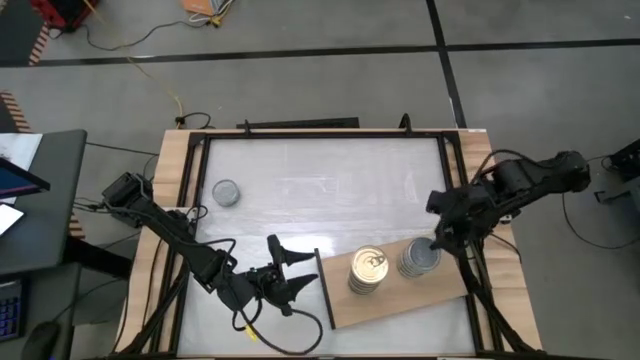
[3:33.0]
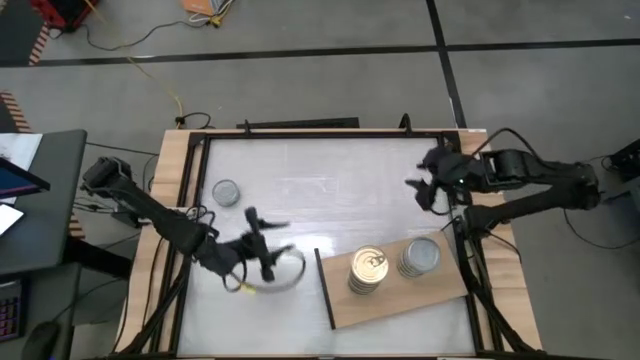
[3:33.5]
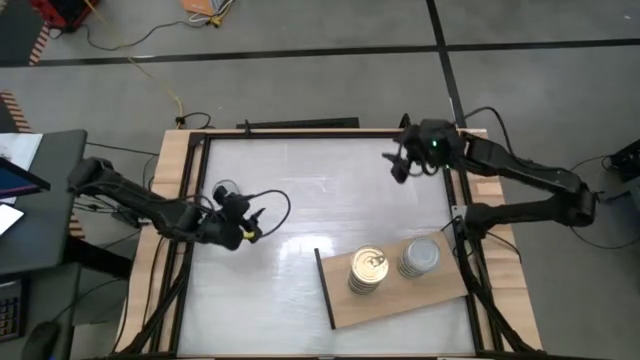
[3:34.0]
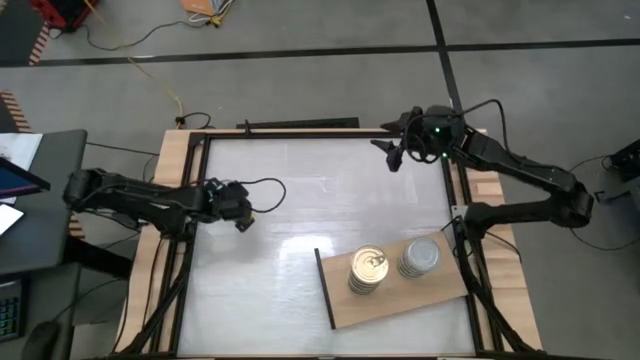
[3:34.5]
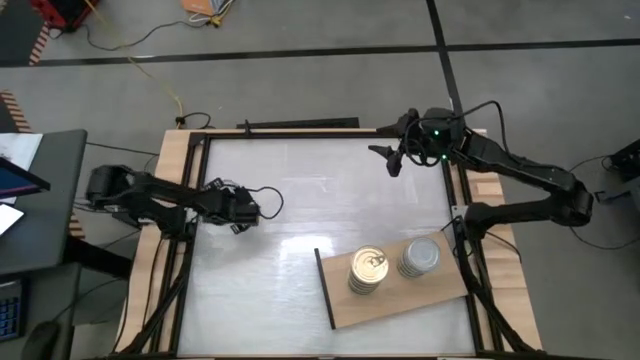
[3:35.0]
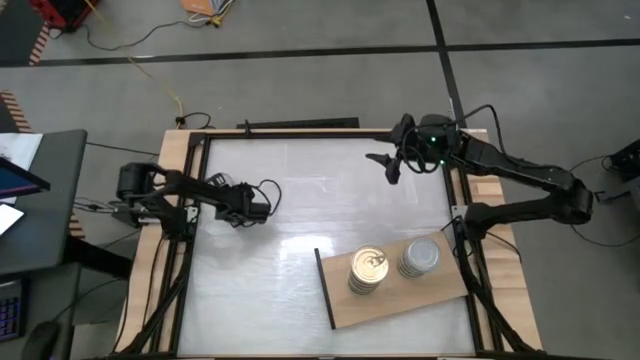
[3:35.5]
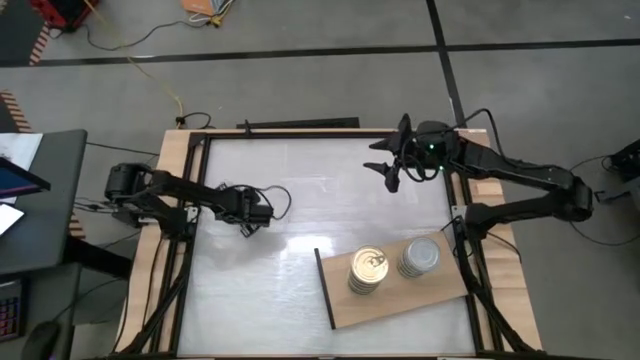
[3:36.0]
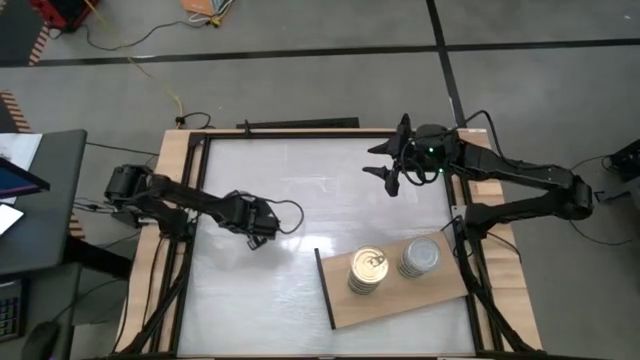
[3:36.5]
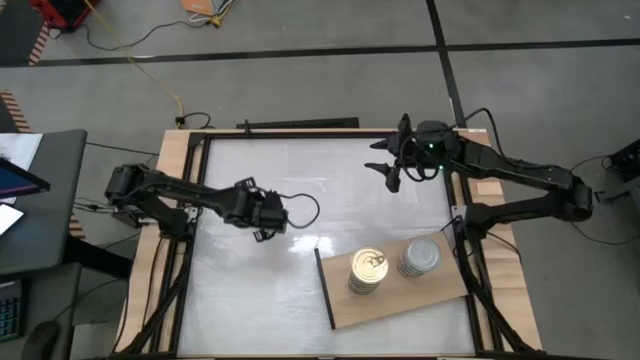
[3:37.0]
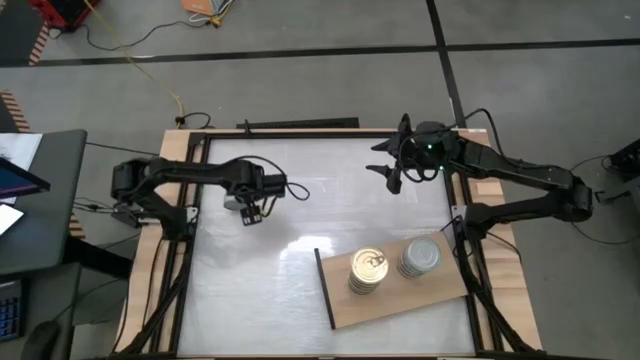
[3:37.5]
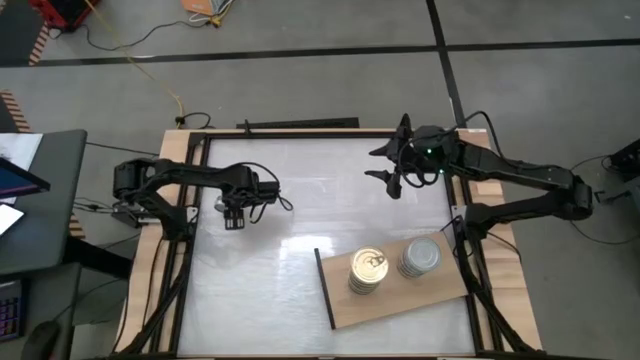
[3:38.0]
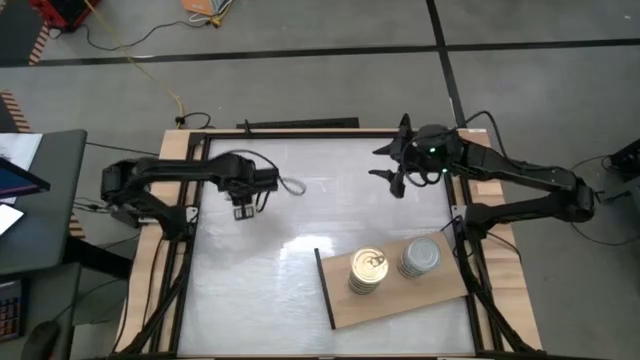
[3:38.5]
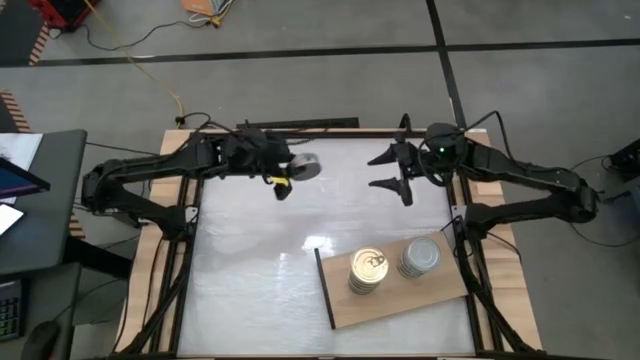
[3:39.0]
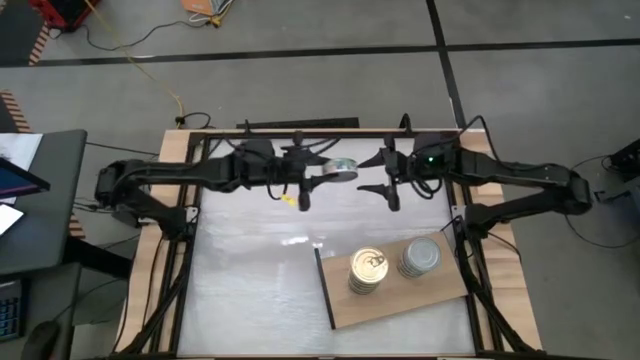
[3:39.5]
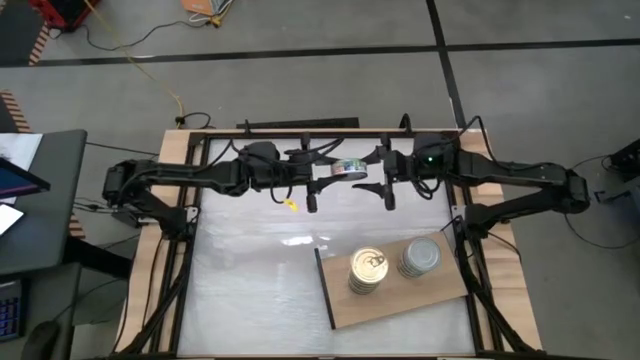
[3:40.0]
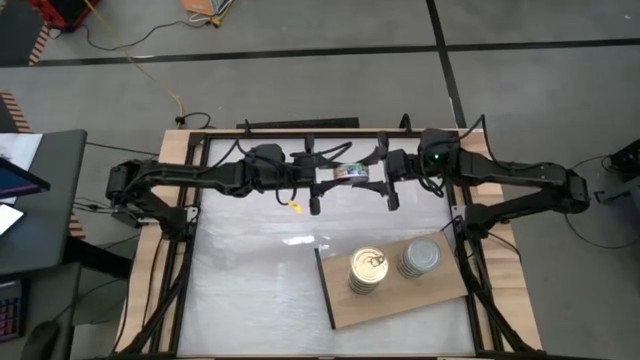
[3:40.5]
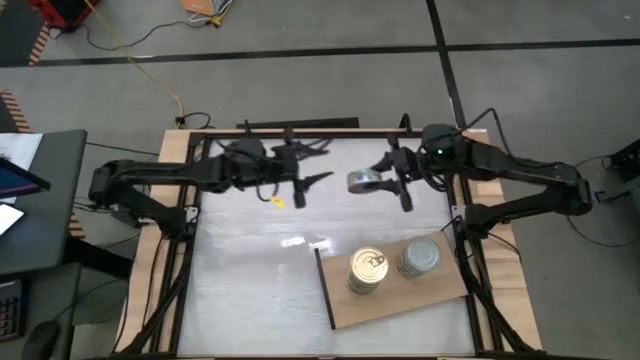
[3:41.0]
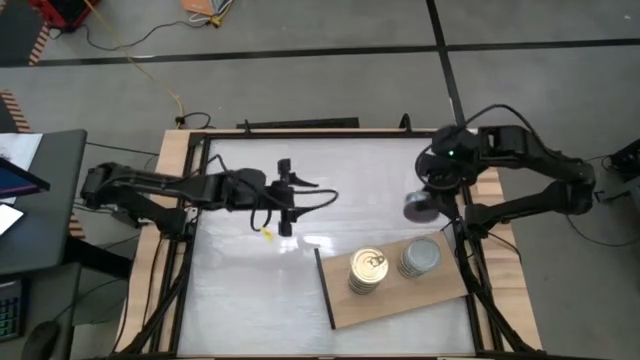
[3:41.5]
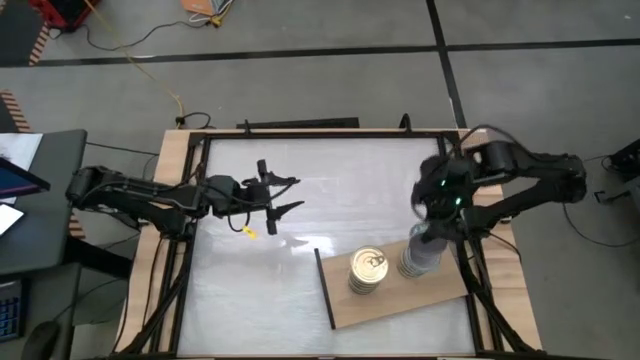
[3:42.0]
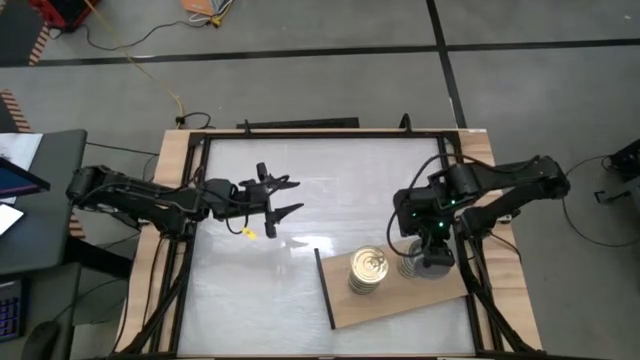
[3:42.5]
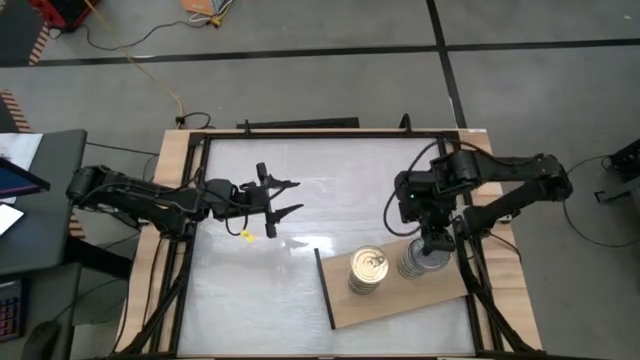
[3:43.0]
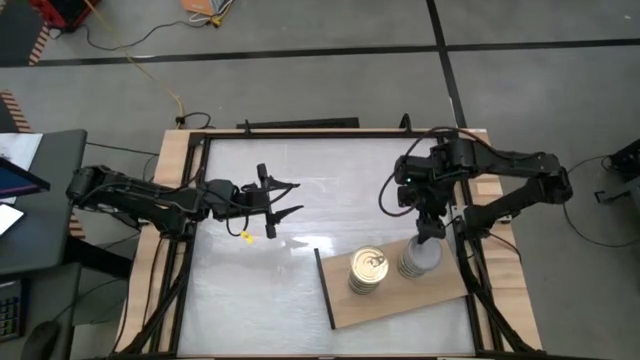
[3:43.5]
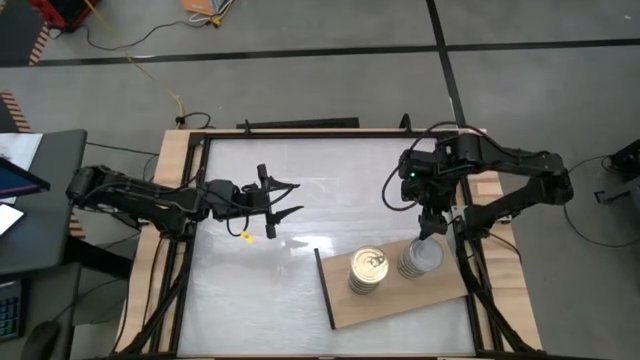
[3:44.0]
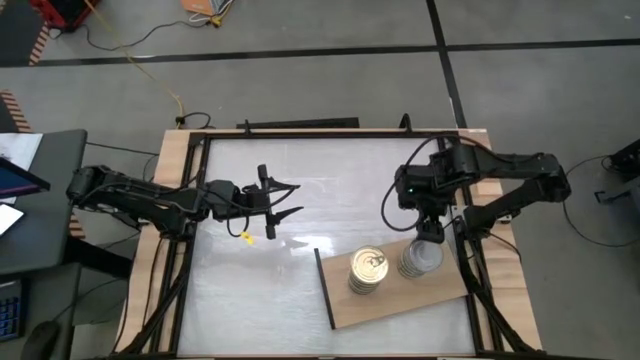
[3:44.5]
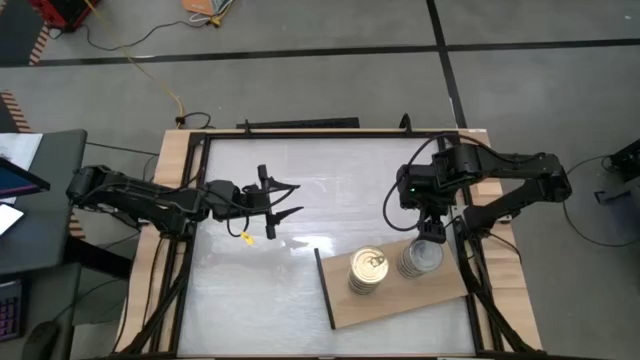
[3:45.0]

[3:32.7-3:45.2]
Task: Stack canned seafood by type on shelf
Stack the green tuna can on top of the green tuna can on the shelf

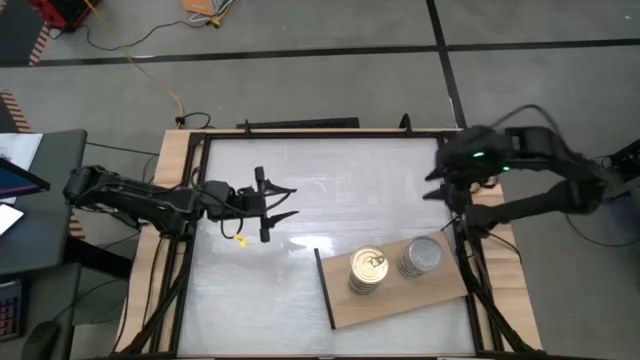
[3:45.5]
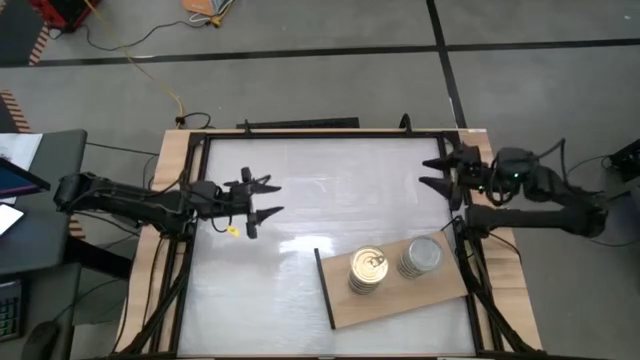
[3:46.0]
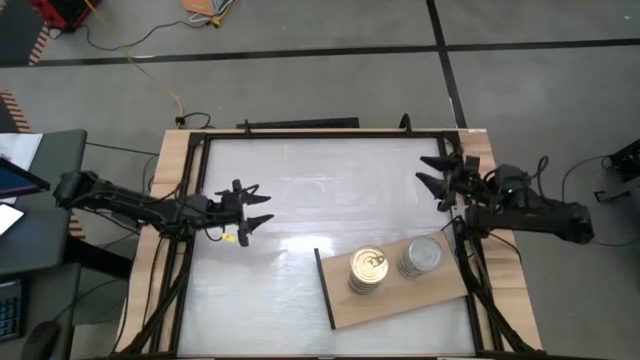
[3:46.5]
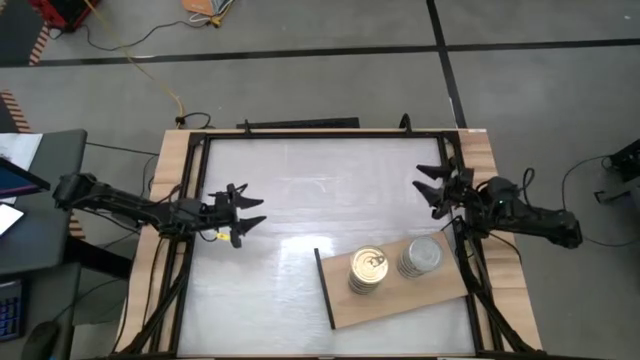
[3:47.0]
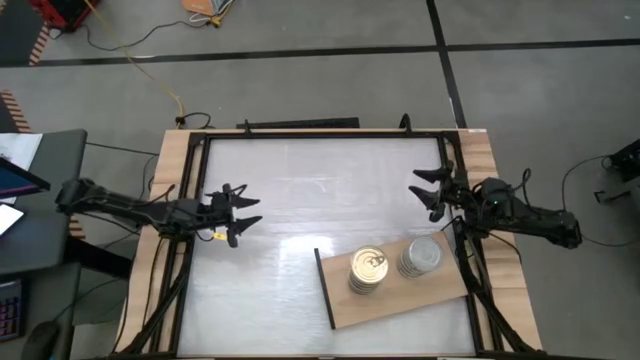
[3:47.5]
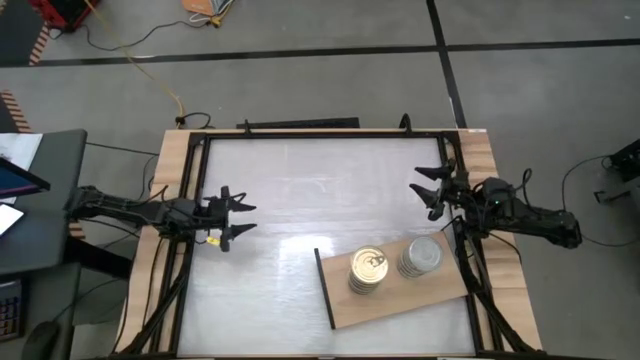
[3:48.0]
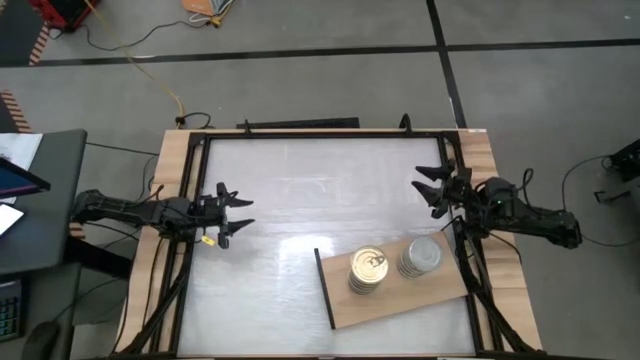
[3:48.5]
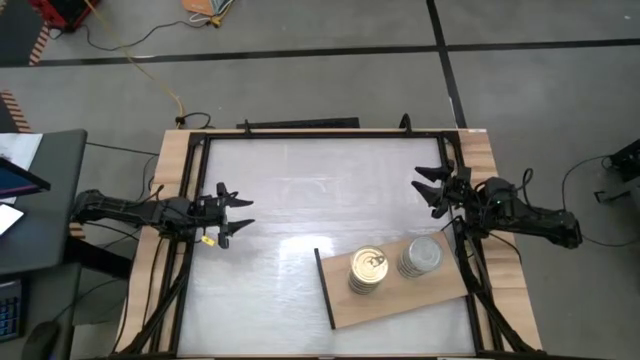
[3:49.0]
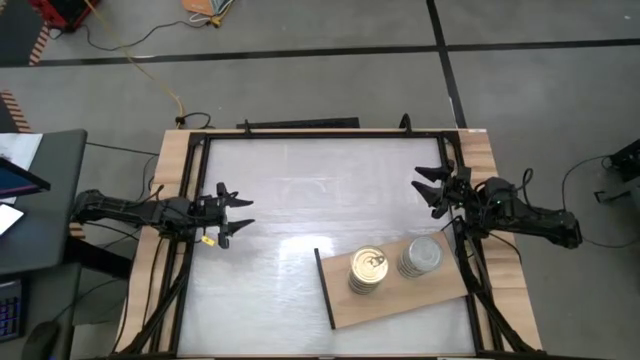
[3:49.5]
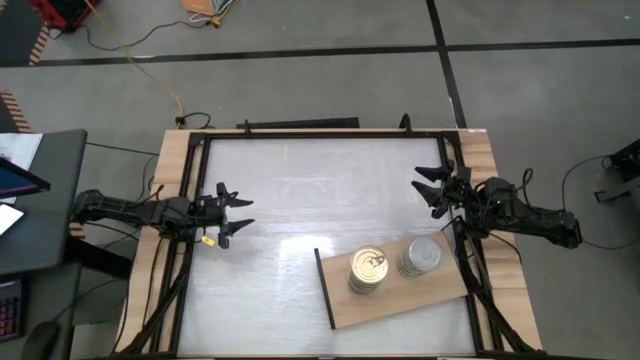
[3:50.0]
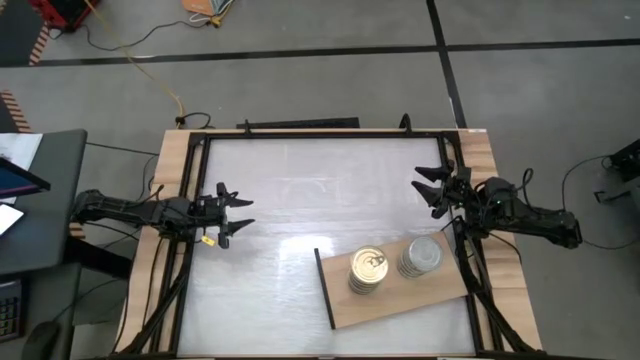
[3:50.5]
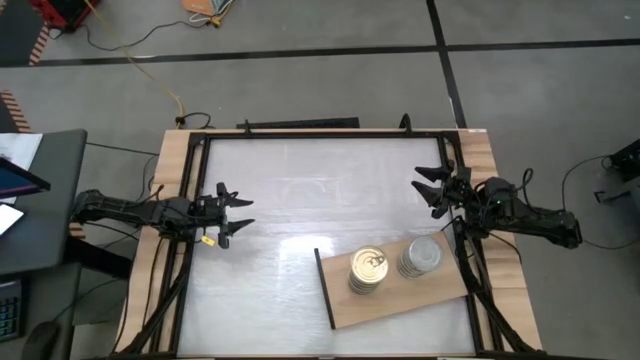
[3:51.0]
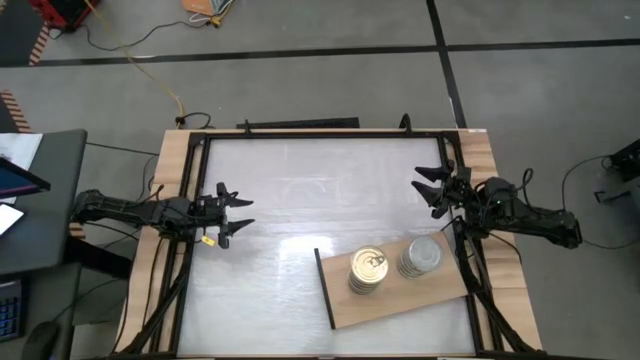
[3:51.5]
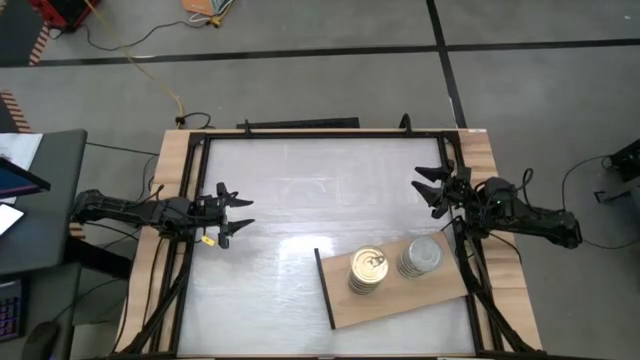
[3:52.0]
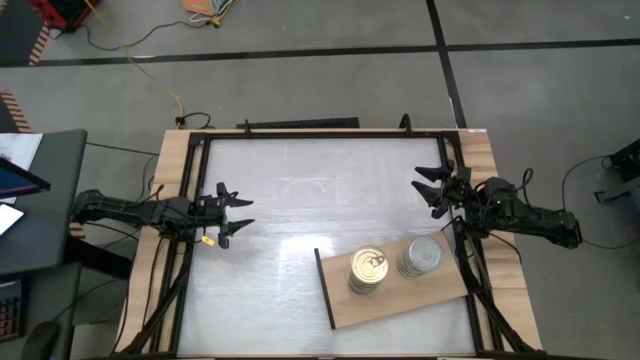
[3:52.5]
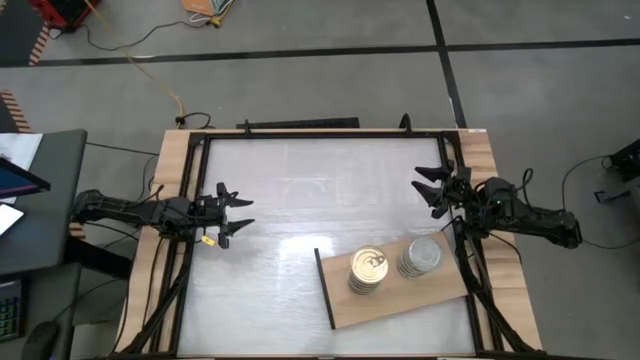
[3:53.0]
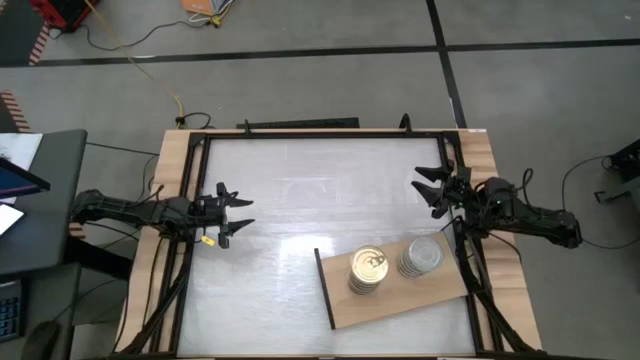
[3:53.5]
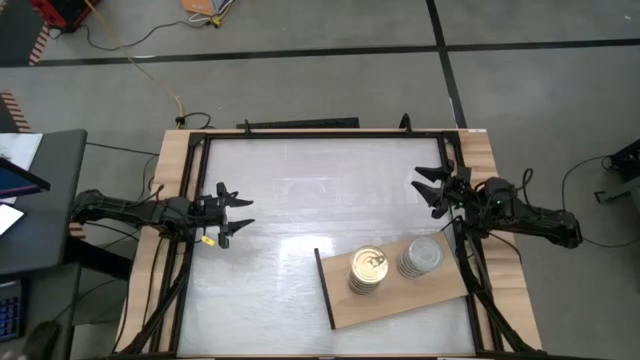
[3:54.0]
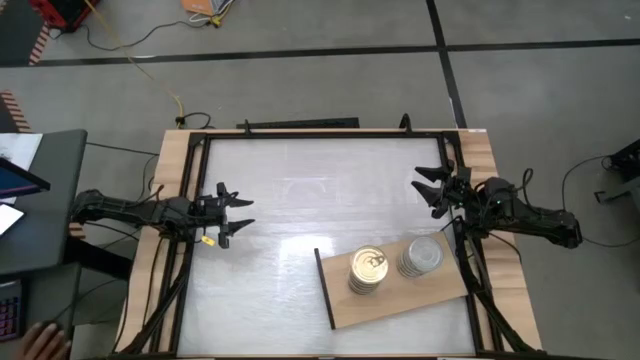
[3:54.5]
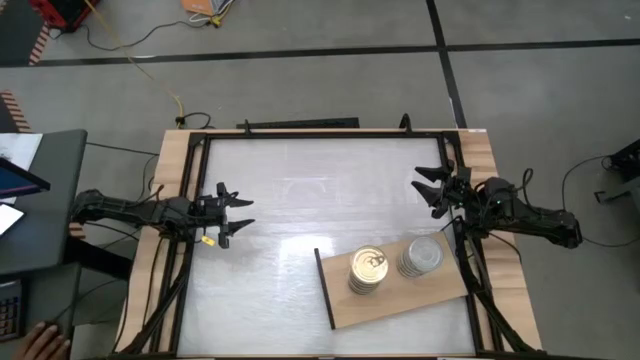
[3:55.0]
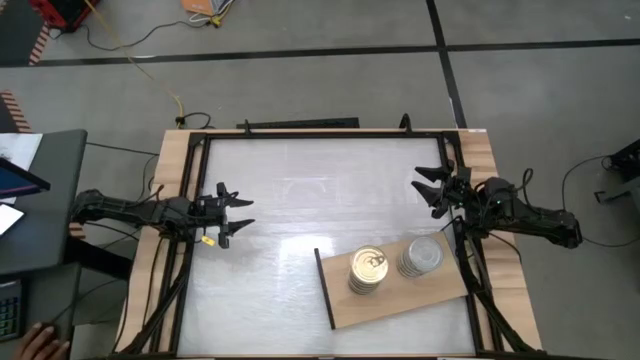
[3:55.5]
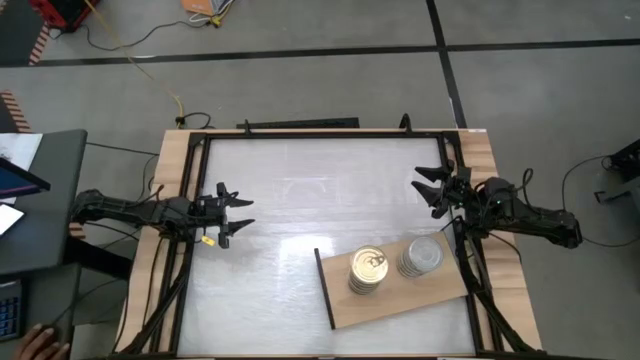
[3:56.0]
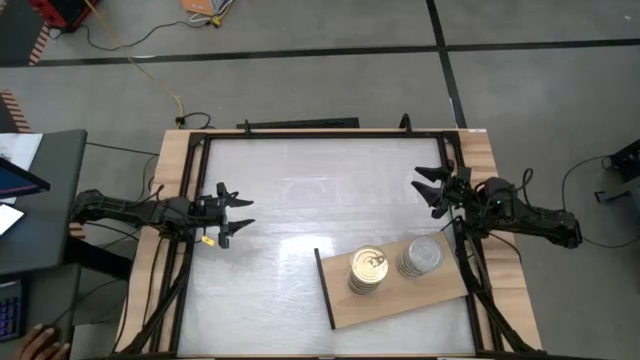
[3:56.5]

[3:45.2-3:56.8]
Return to Home Position
